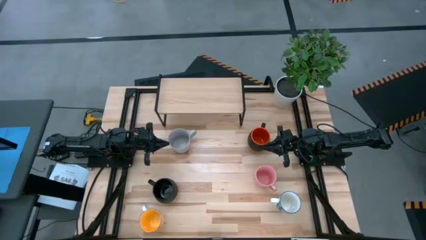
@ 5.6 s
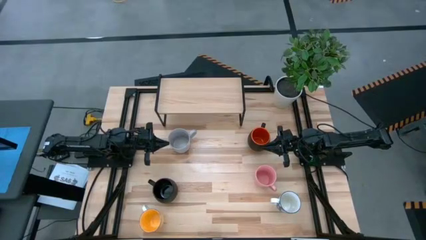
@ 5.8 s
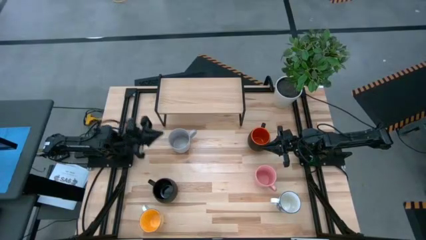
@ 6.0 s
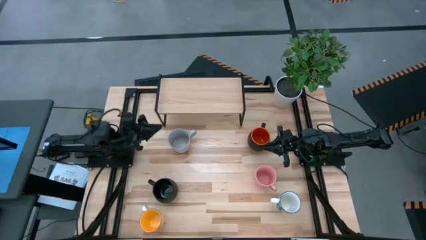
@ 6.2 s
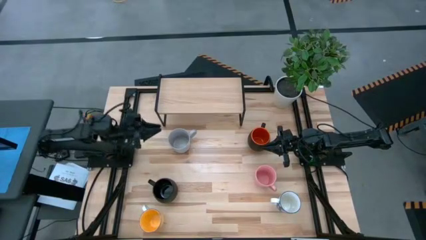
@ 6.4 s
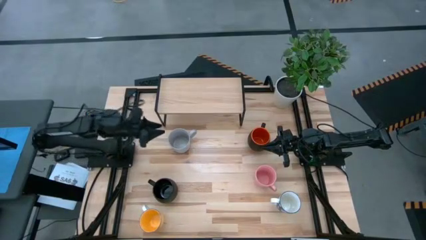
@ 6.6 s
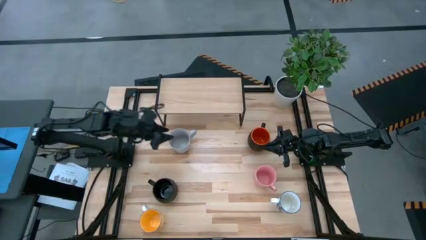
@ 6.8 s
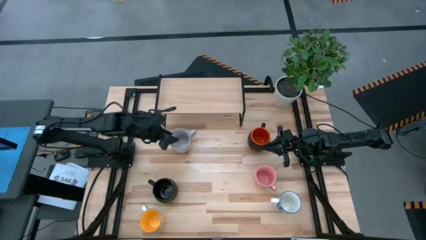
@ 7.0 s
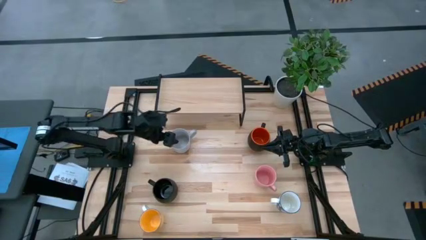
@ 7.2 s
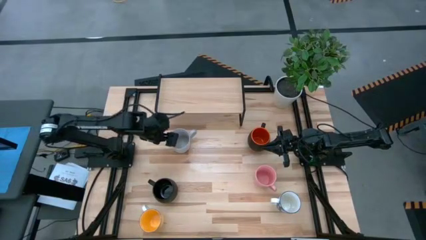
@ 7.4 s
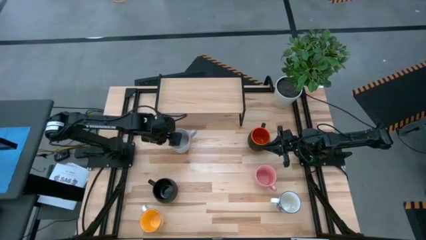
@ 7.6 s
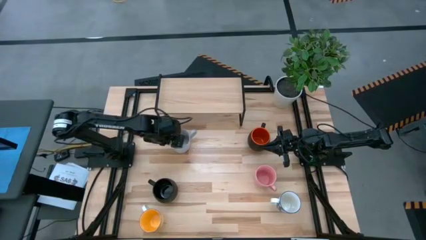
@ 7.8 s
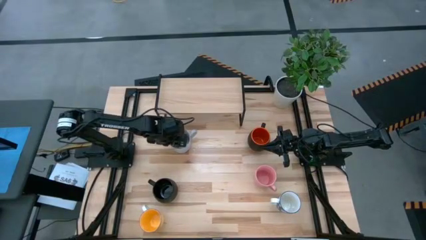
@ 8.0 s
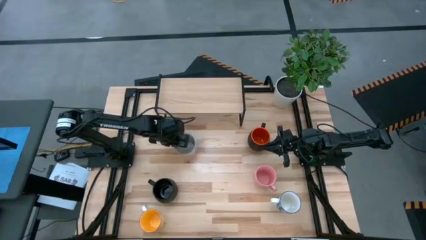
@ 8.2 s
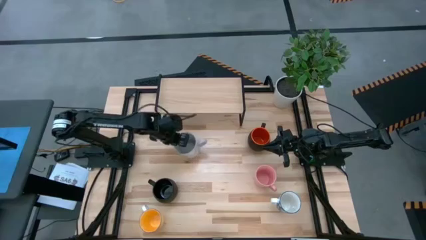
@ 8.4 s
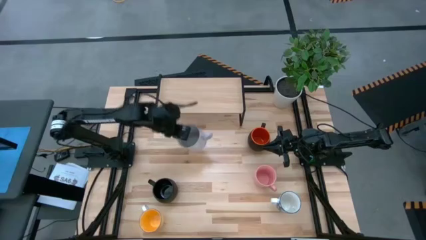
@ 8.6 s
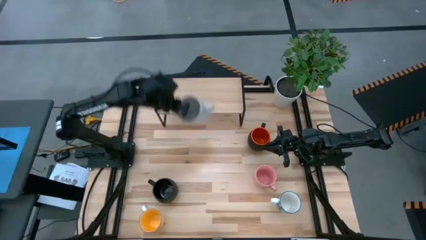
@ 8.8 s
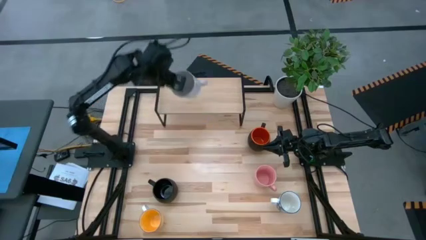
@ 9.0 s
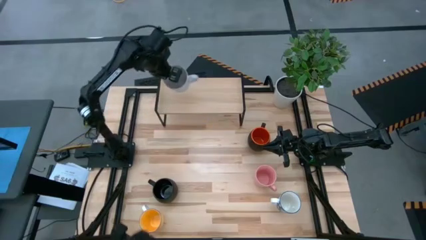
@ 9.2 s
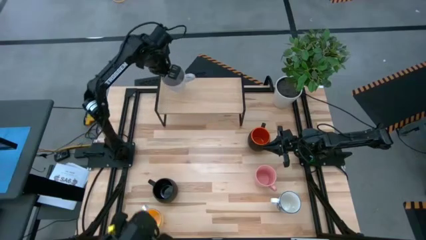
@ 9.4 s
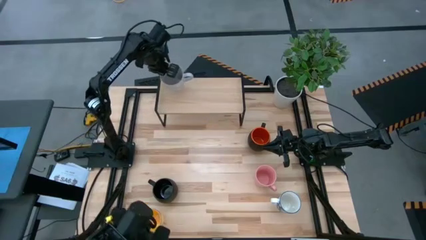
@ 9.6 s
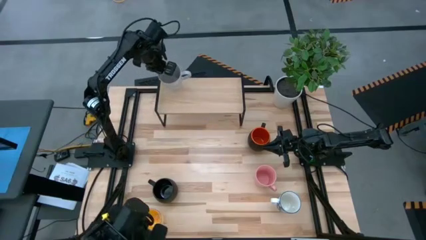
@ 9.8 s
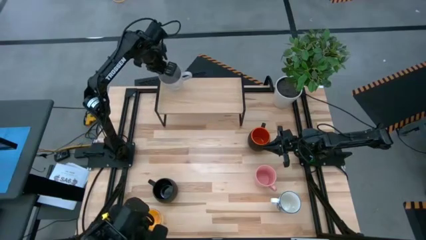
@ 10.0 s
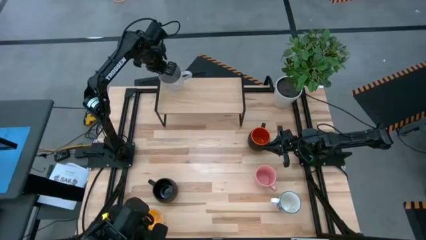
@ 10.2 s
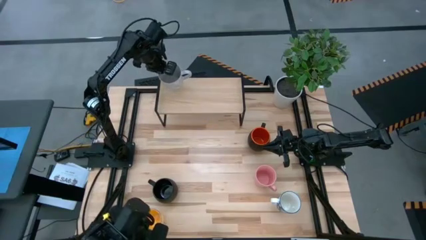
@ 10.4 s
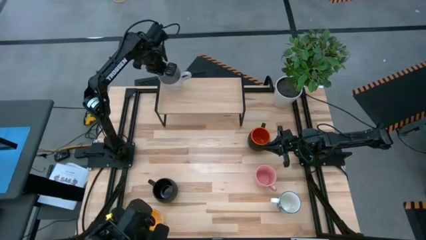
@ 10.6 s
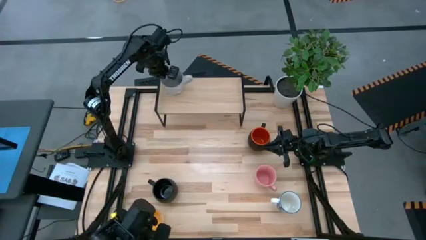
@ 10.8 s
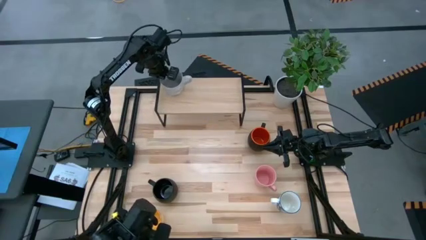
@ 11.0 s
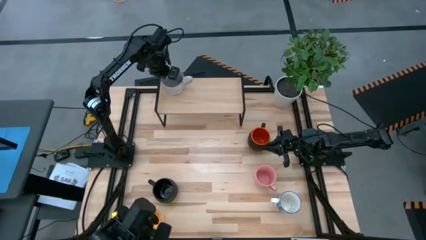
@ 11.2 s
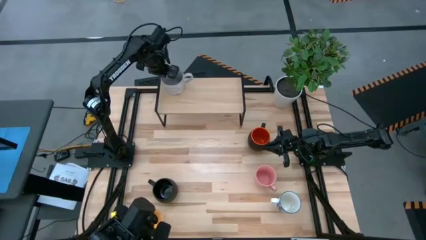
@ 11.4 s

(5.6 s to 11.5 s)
Task: Place coffee mugs
Put the white cup on the shelf

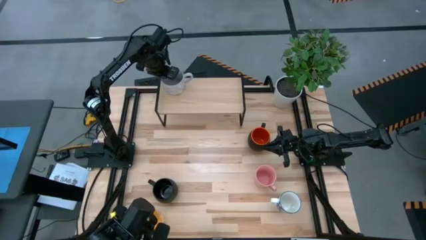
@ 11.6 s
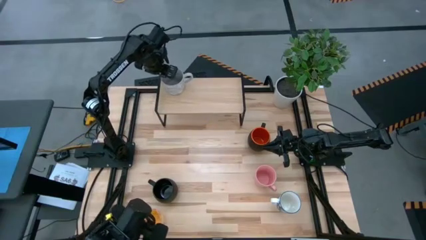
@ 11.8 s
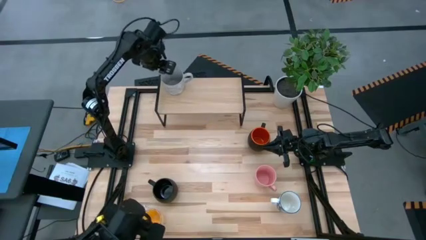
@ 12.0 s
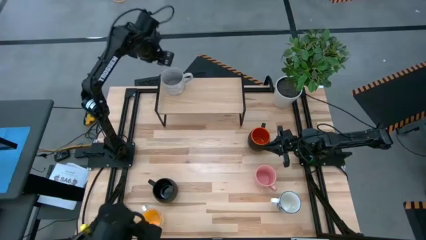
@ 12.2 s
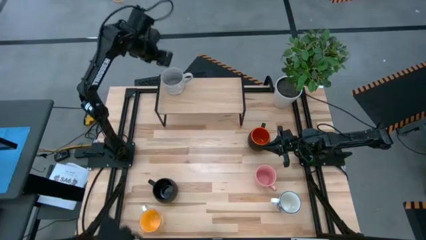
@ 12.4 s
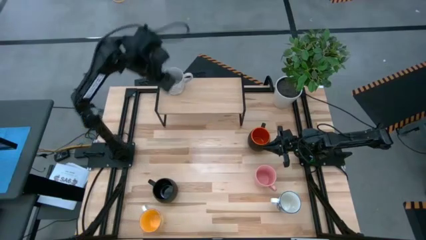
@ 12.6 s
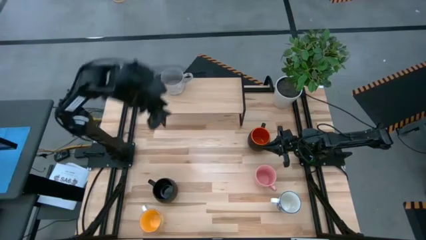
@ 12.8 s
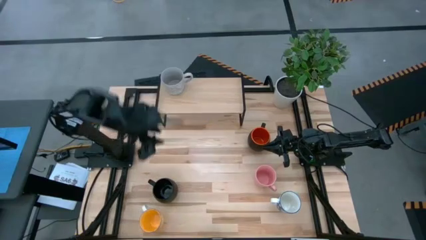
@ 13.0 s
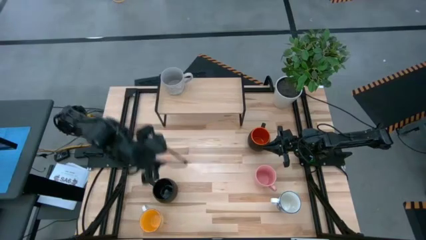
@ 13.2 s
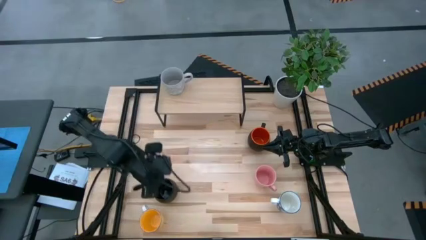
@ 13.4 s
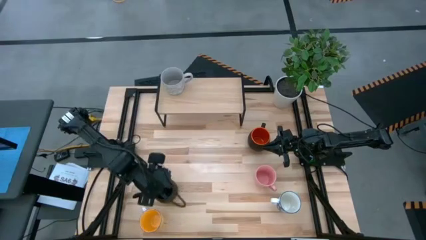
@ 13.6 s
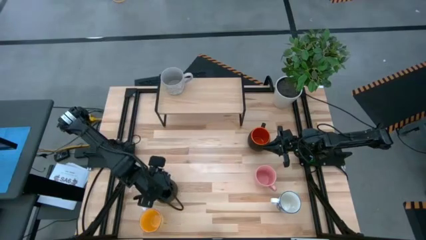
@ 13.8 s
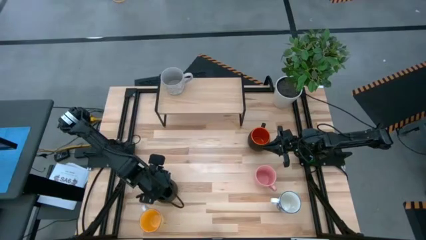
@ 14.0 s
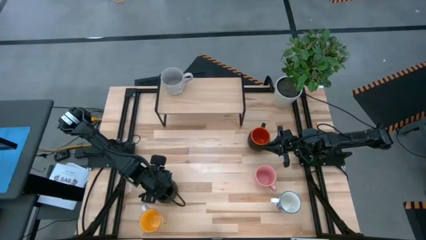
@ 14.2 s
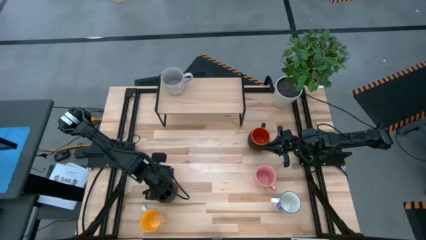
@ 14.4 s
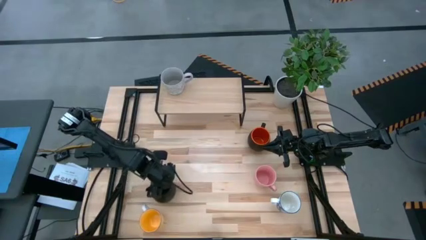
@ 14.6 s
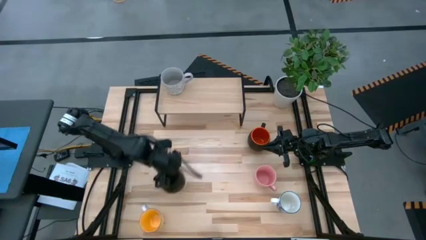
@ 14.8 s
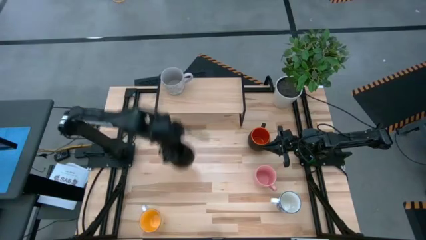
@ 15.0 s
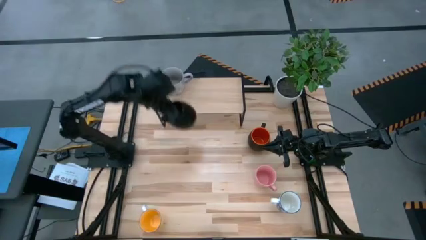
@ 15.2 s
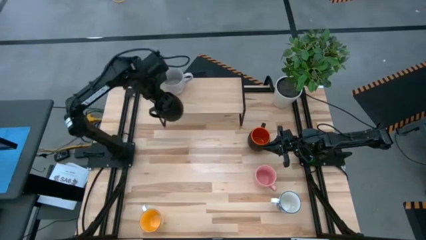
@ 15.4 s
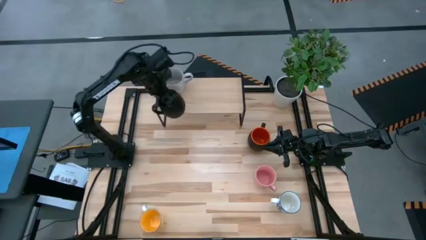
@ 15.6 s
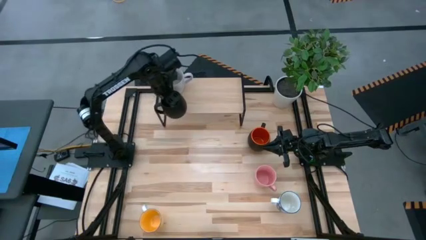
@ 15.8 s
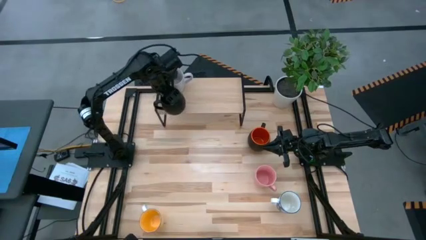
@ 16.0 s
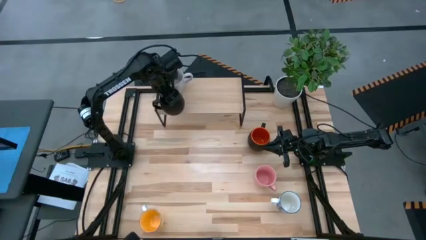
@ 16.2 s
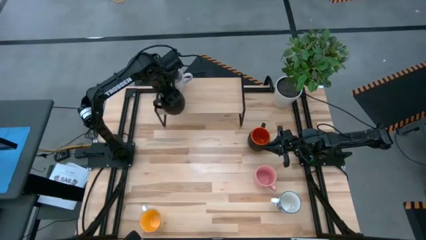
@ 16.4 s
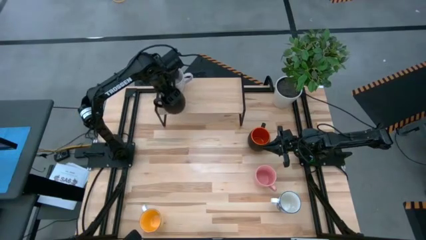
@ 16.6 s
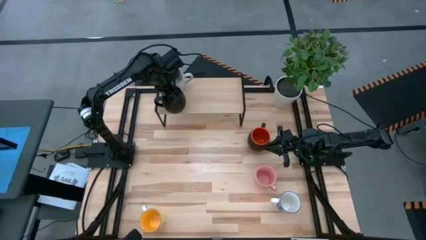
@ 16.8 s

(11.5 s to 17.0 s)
Put the black cup on the shelf

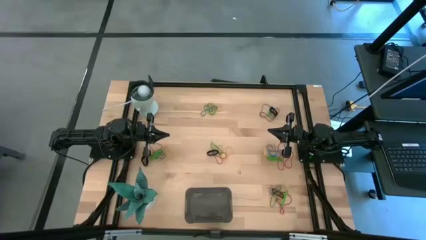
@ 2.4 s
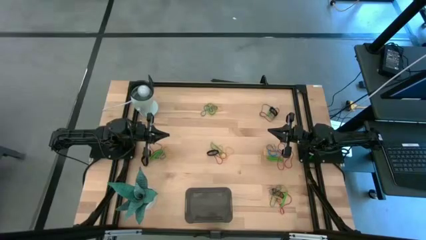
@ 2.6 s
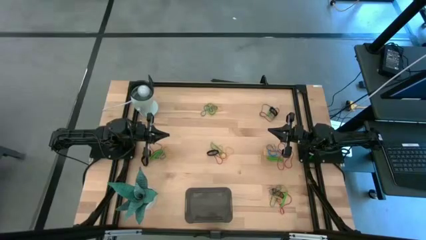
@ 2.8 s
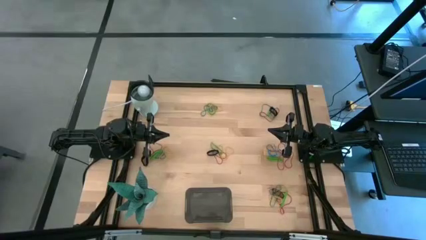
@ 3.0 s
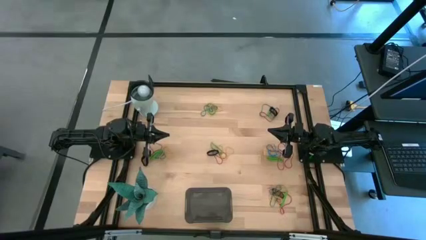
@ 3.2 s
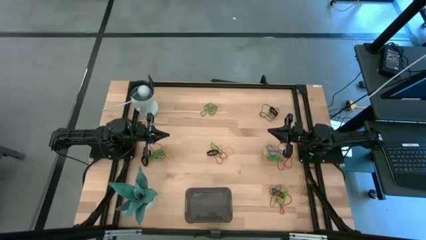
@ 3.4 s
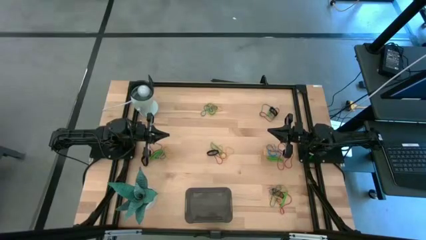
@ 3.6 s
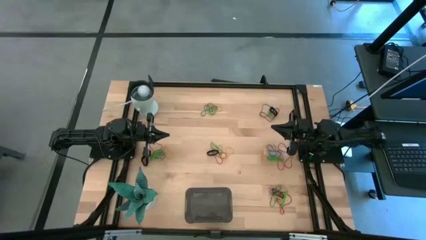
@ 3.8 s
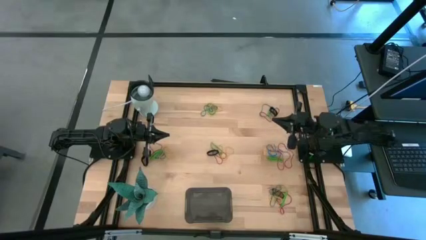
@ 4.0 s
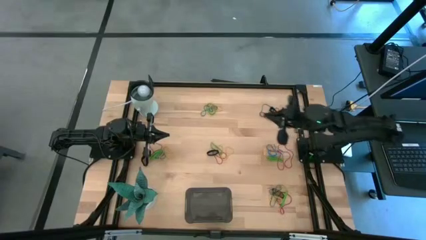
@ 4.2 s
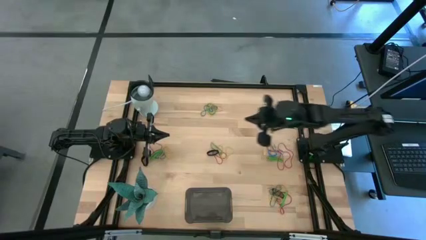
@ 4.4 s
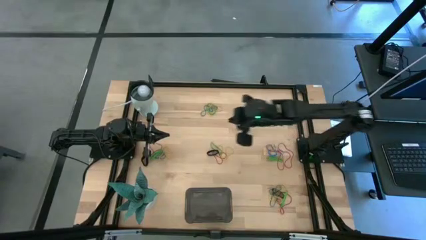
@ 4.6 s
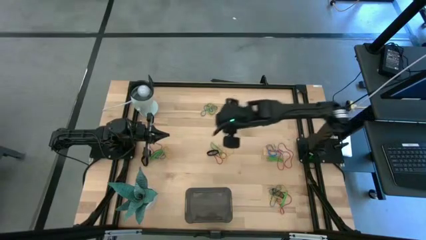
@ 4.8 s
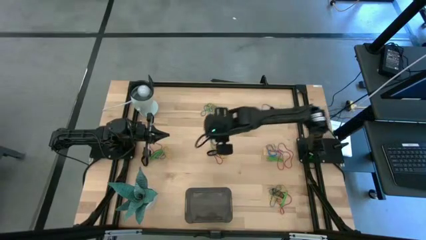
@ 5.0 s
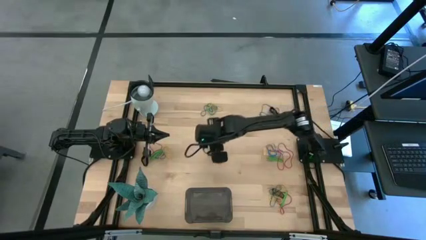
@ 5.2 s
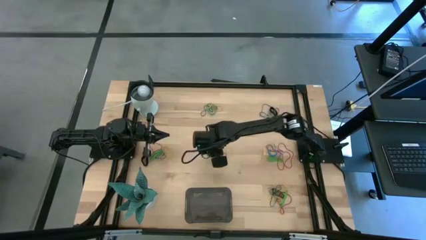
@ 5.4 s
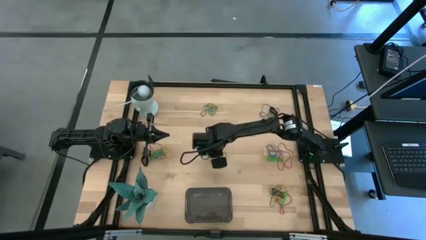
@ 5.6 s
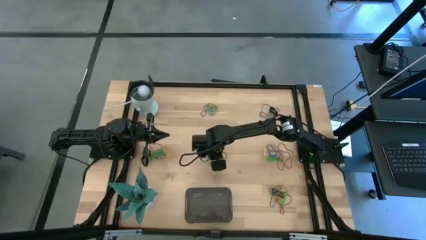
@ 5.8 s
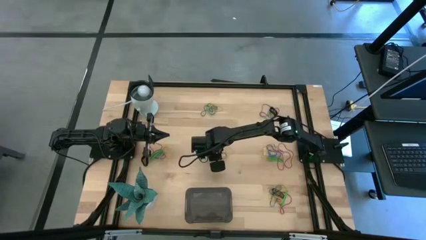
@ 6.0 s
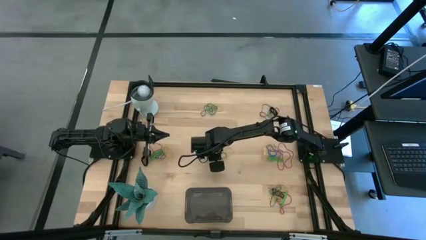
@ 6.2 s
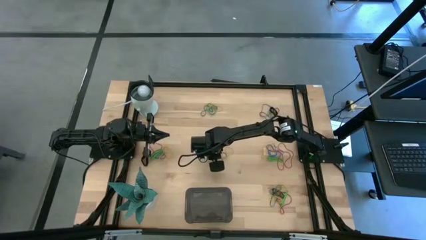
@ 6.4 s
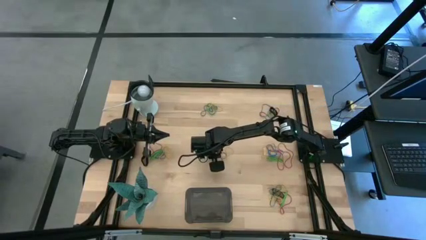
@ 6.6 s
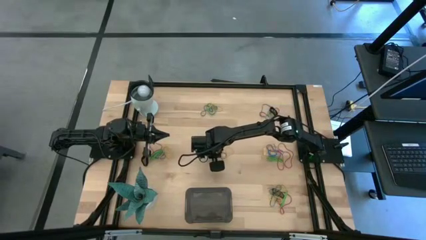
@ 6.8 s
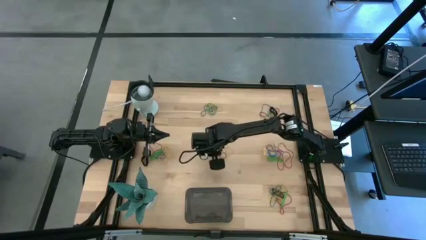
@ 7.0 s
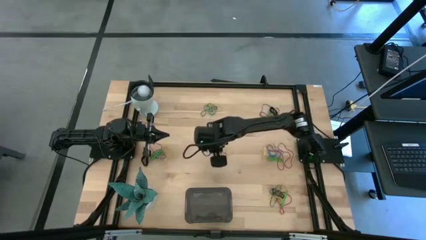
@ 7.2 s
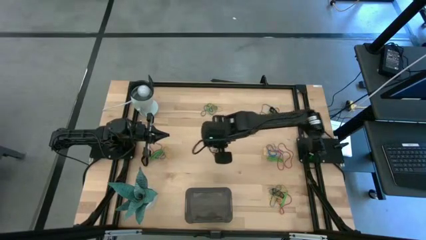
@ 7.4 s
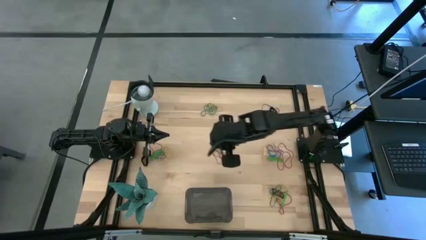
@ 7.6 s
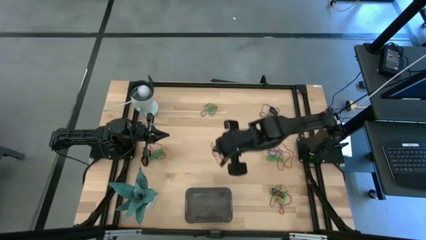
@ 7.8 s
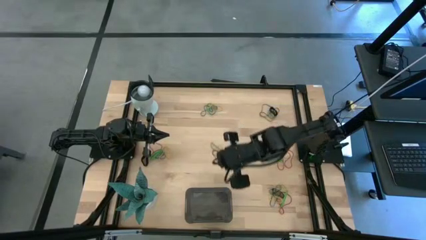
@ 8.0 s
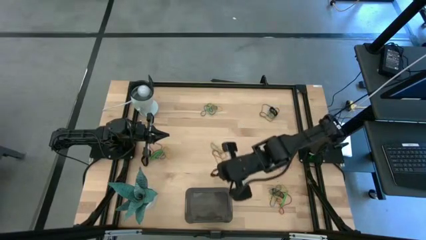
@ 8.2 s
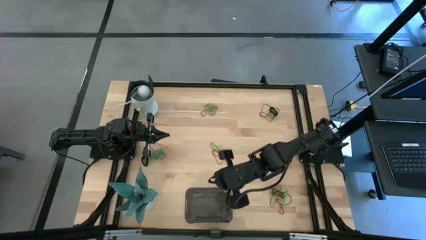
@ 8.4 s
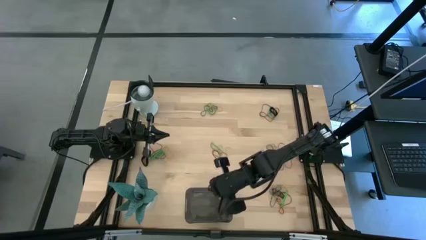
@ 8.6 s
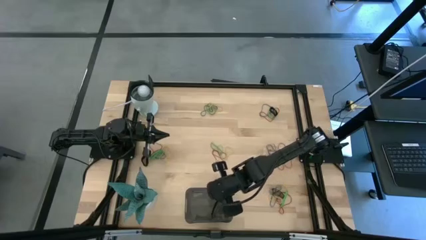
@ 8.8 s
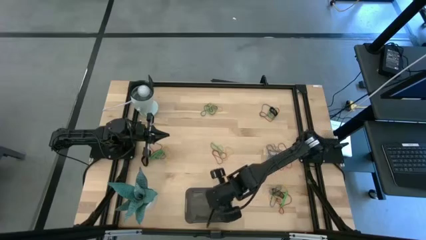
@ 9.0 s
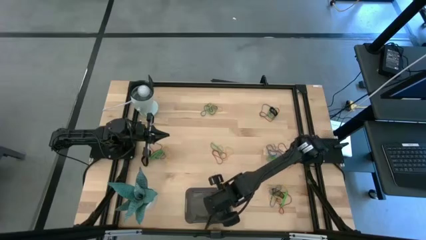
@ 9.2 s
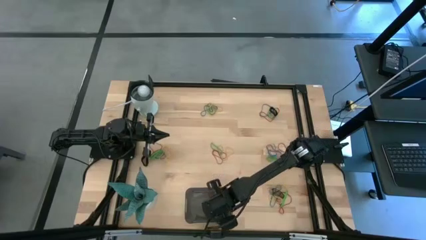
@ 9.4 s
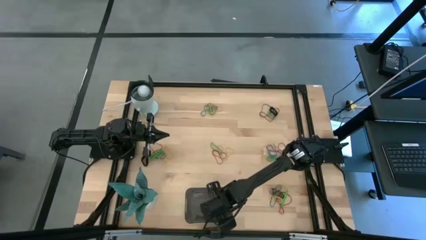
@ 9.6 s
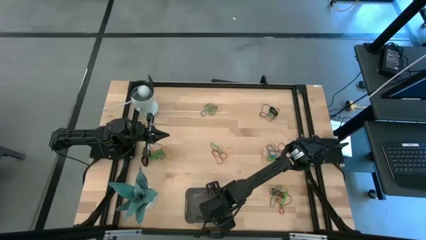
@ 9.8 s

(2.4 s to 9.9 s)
Task: Pick and place rubber bands into bin
Put the black rubber band into the black bin
